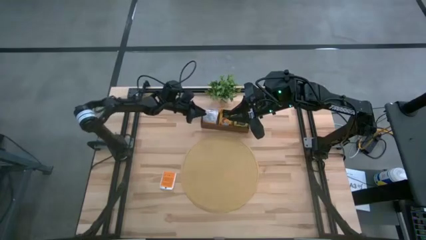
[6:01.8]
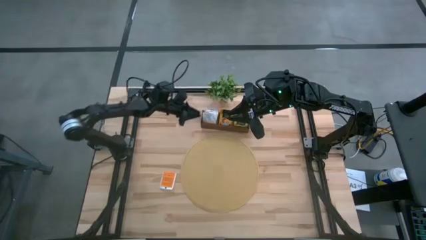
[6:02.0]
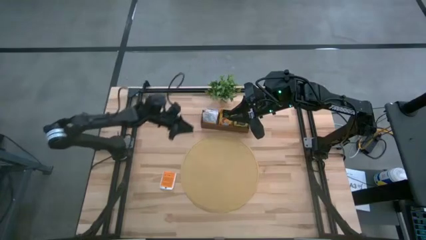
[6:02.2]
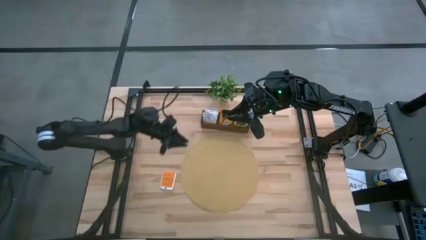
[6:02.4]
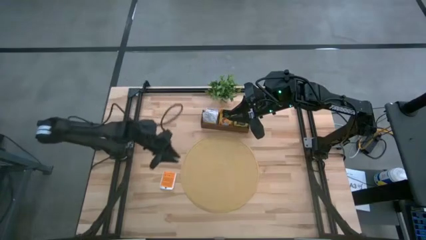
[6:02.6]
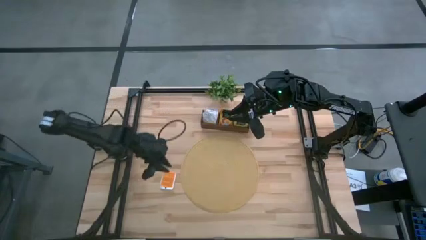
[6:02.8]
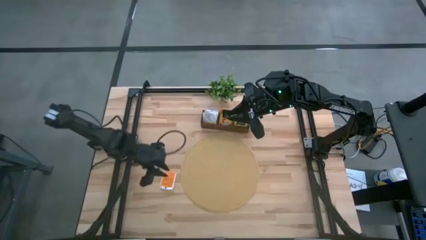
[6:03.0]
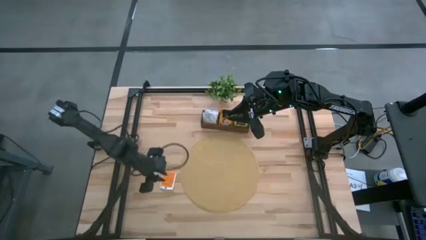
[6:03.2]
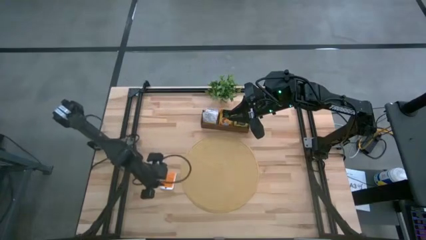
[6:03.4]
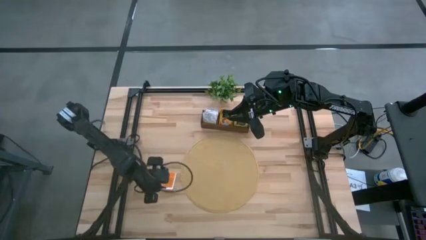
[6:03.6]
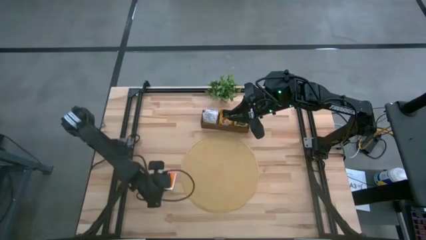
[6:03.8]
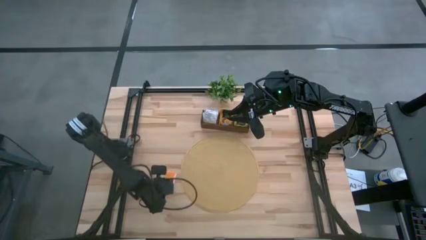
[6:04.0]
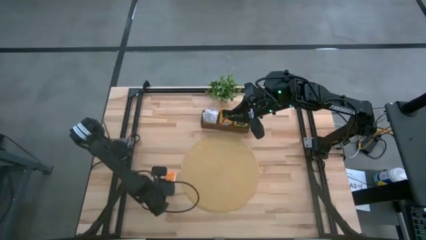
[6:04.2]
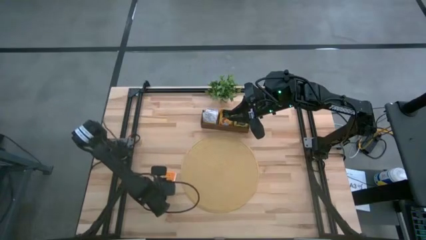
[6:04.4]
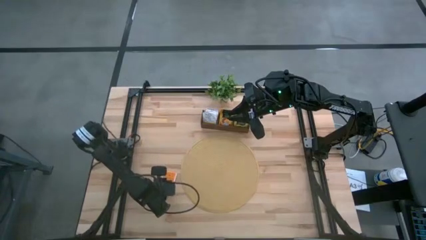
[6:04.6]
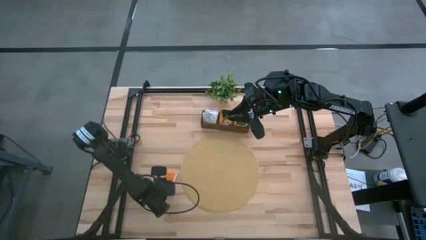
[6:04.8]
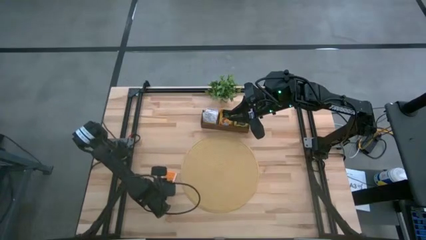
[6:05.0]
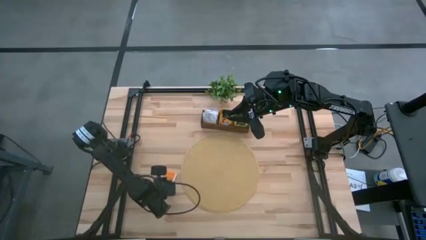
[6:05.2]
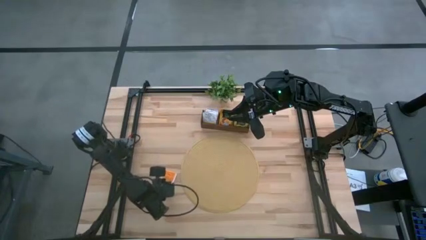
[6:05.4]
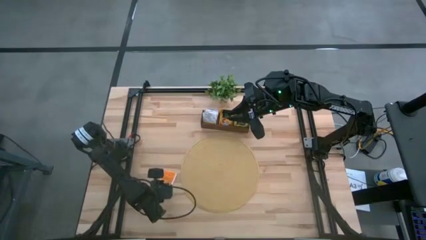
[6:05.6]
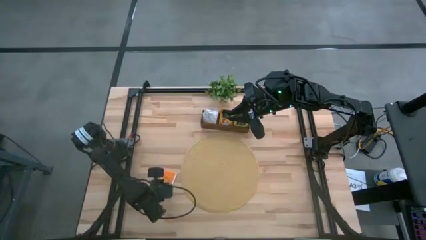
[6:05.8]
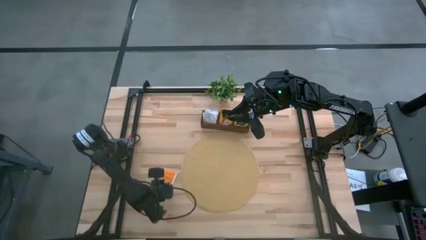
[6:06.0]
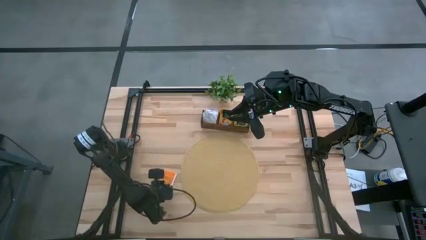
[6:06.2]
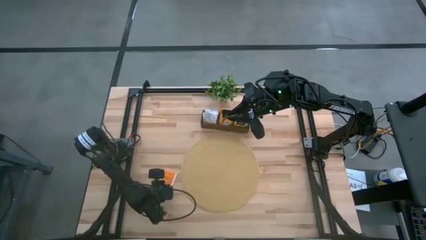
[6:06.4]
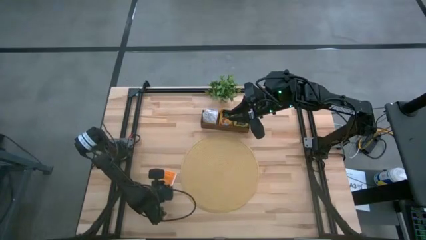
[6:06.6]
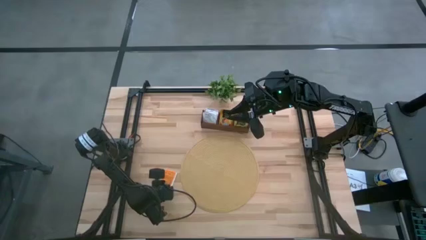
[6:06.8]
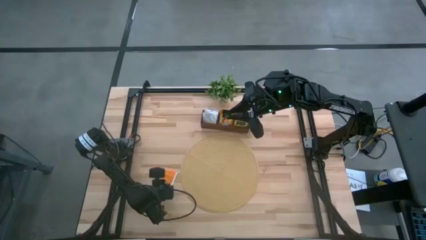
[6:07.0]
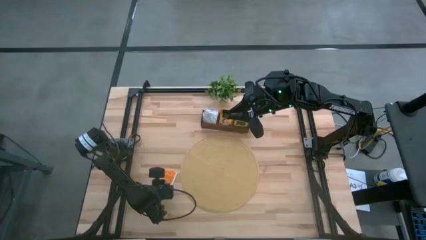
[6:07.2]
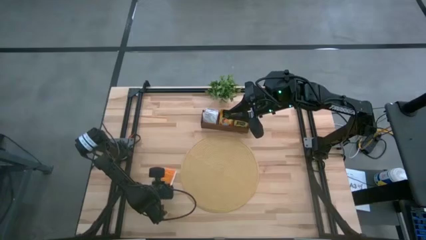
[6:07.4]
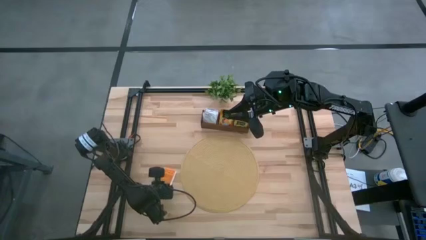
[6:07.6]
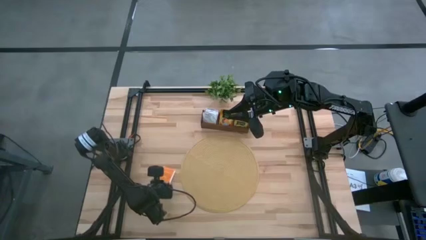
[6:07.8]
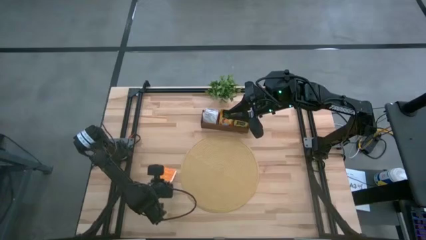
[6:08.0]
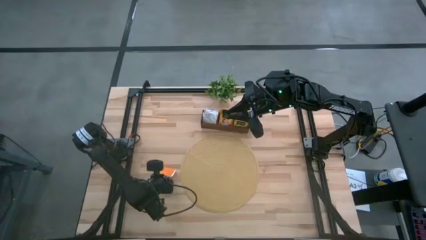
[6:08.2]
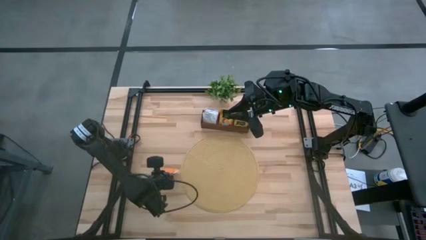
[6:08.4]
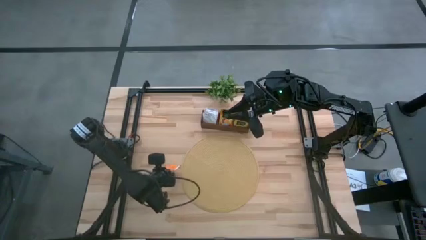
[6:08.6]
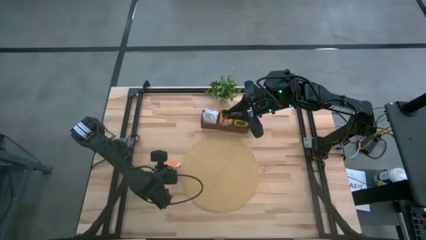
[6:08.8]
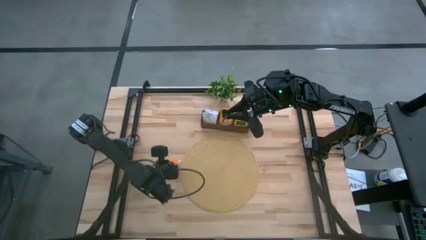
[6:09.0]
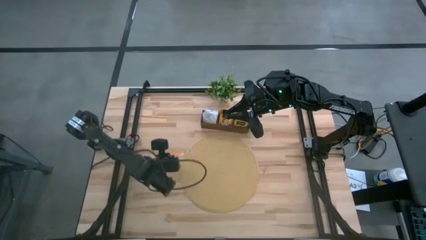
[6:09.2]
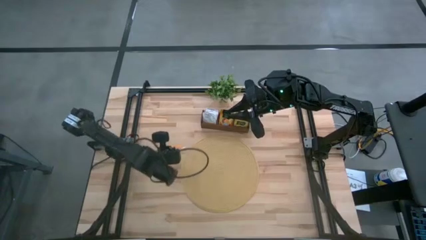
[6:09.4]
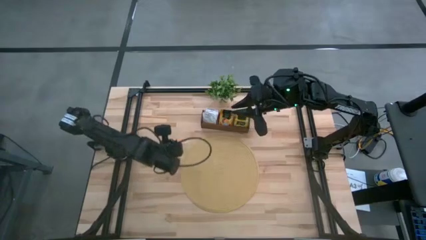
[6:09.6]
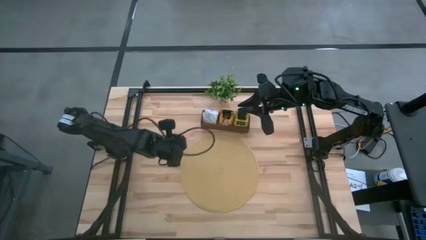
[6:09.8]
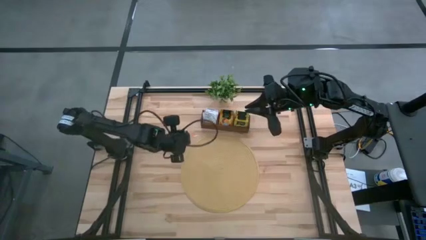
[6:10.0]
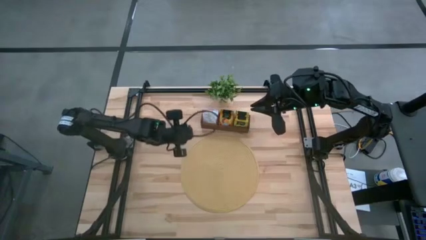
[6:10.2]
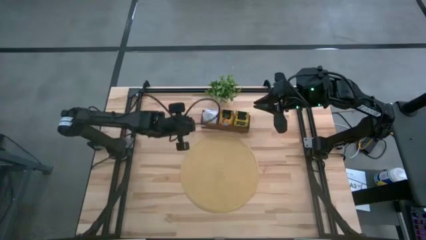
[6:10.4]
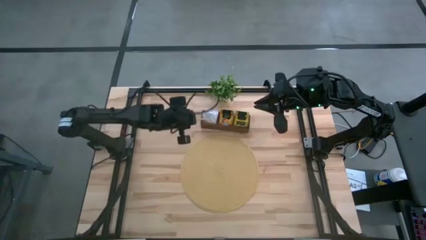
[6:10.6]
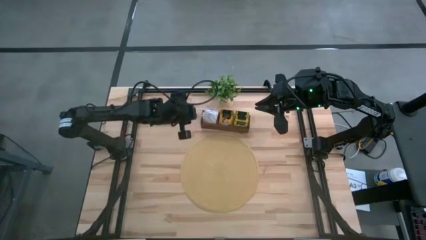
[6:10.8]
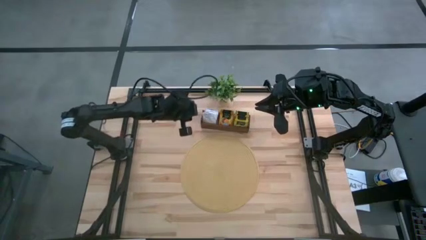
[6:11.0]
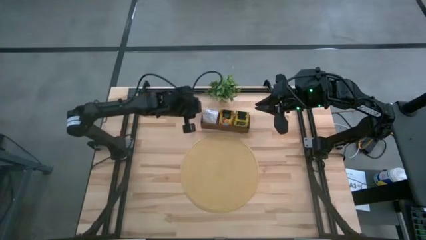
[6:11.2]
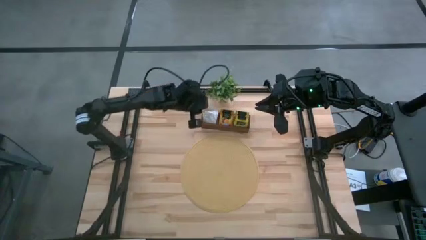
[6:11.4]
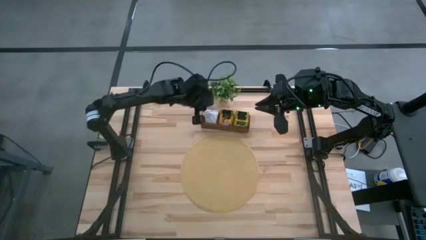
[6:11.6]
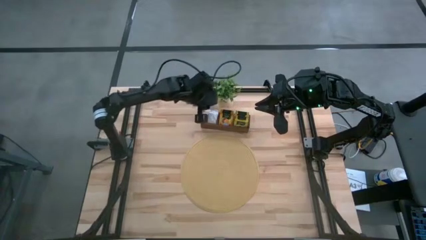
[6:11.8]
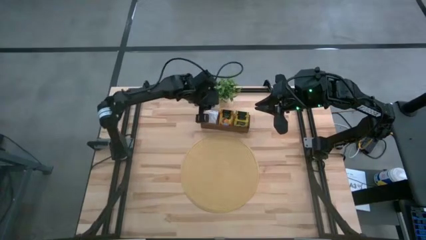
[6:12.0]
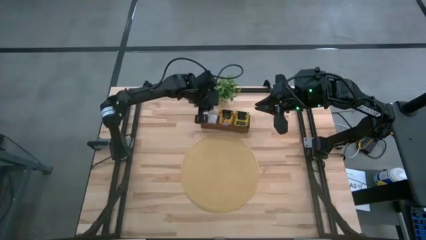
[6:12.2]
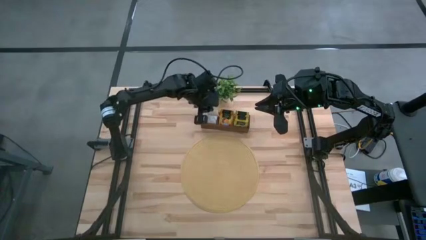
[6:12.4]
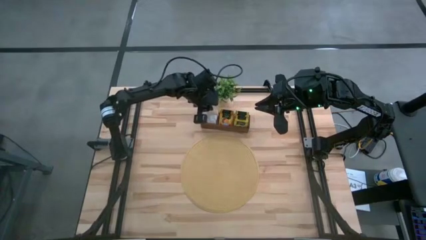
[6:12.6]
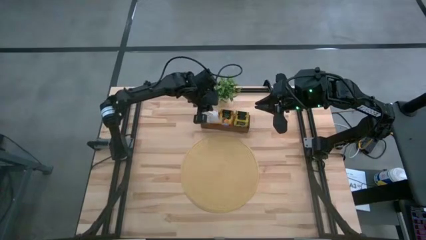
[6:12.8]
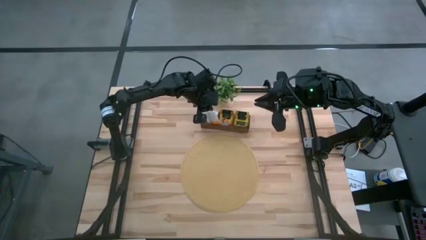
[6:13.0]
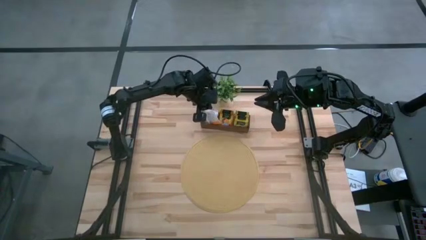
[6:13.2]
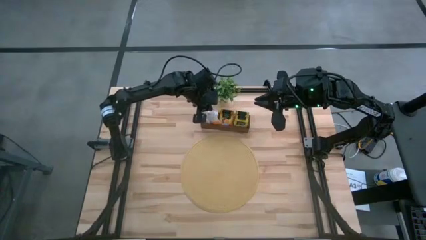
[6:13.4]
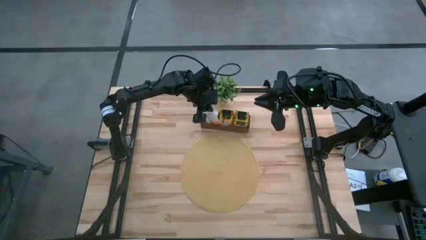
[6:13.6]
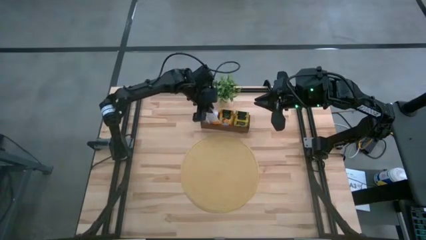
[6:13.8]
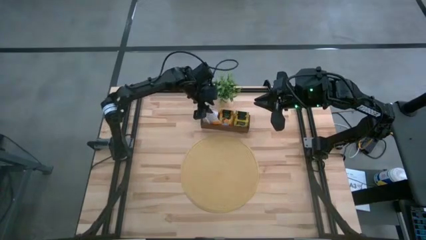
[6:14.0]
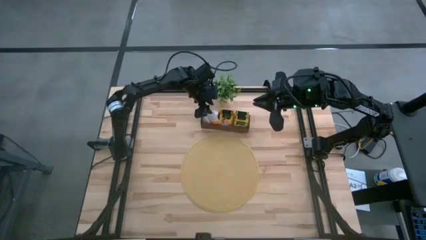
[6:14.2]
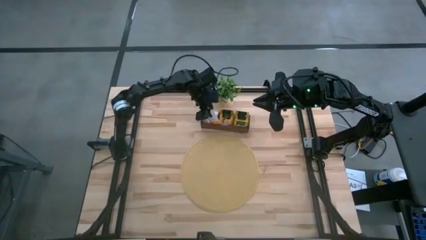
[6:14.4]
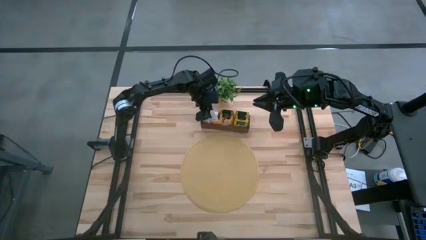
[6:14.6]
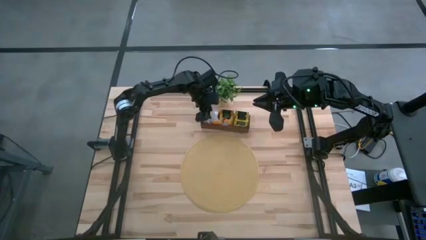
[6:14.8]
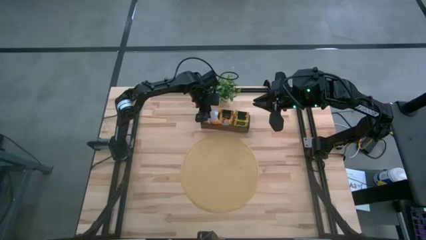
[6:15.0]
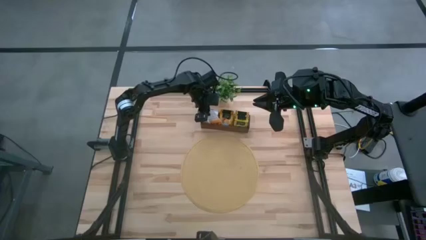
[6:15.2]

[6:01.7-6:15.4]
Task: Pick & Place Tea
Put the white tea bag into the left section of the wooden organizer

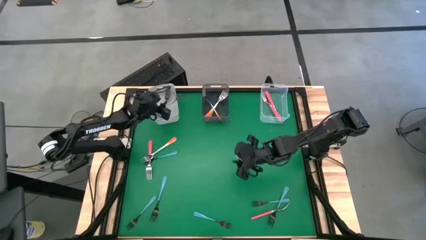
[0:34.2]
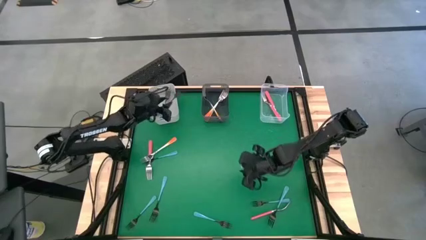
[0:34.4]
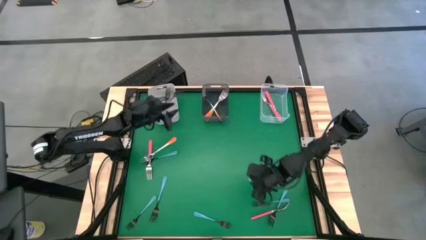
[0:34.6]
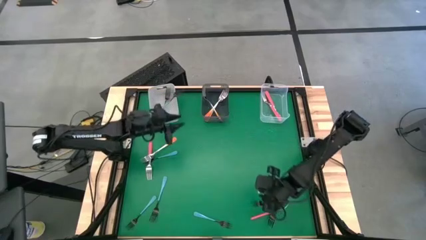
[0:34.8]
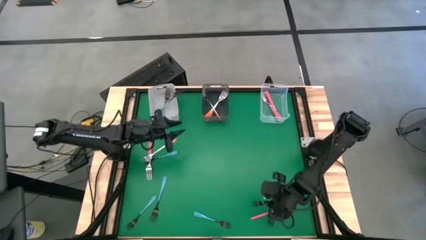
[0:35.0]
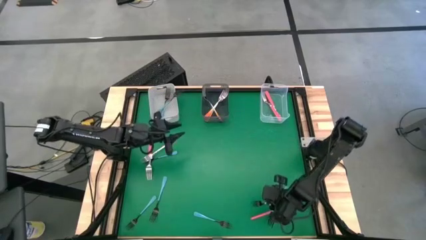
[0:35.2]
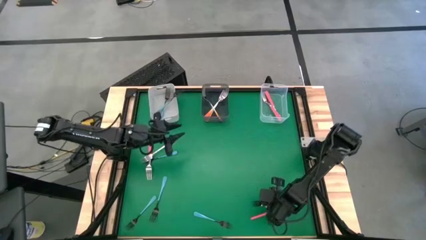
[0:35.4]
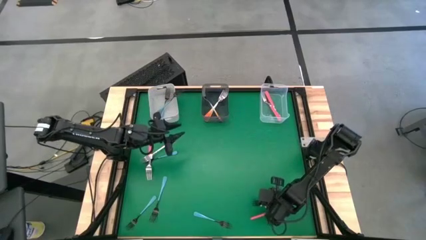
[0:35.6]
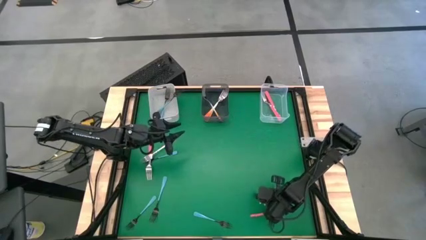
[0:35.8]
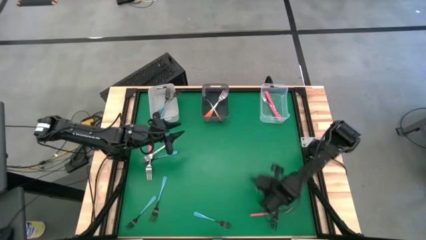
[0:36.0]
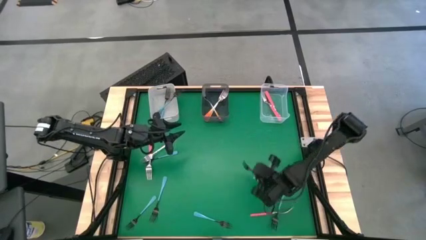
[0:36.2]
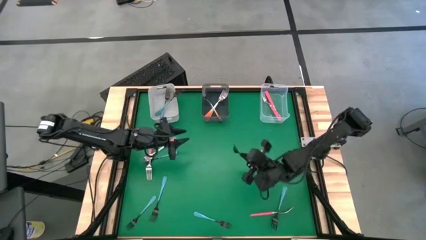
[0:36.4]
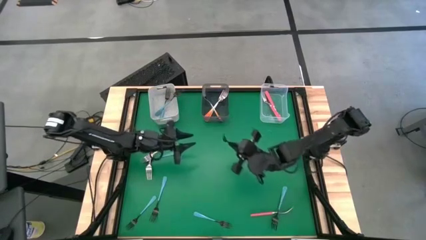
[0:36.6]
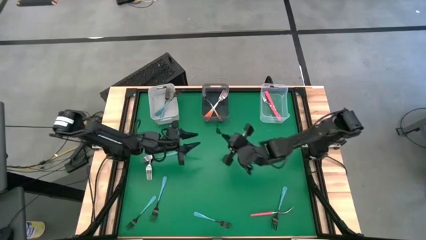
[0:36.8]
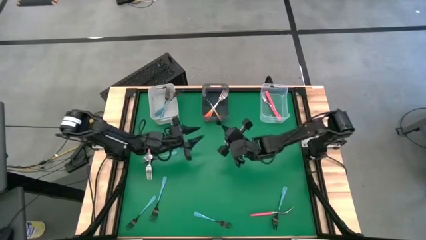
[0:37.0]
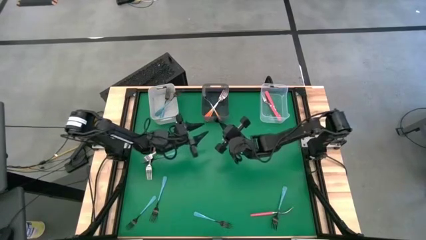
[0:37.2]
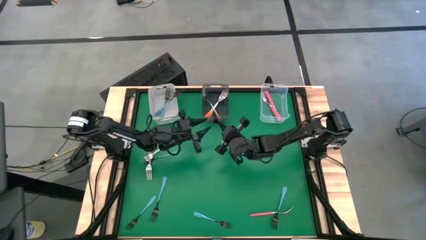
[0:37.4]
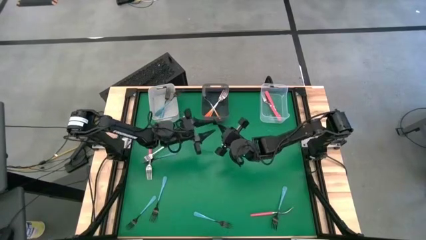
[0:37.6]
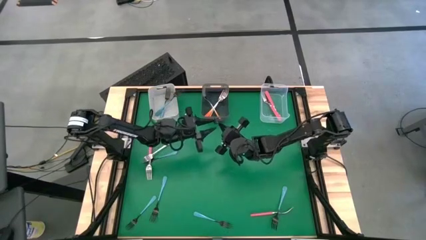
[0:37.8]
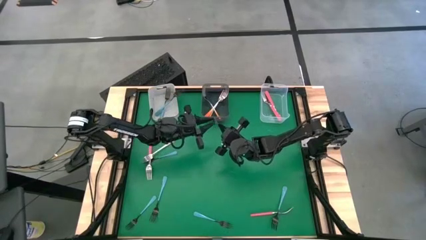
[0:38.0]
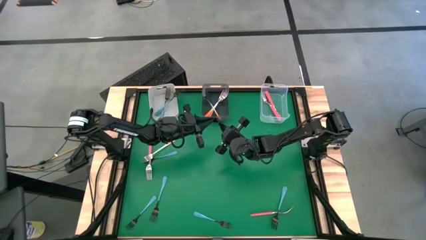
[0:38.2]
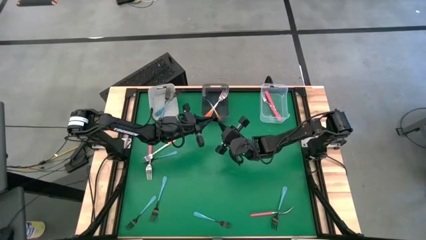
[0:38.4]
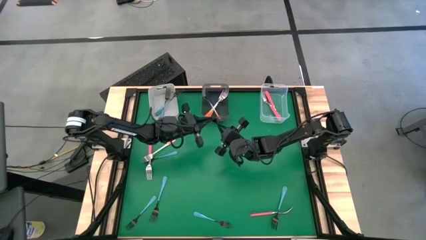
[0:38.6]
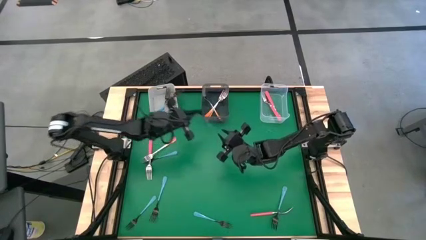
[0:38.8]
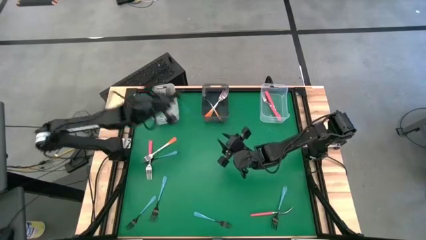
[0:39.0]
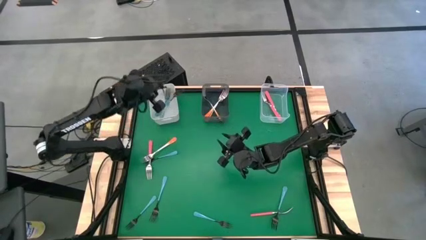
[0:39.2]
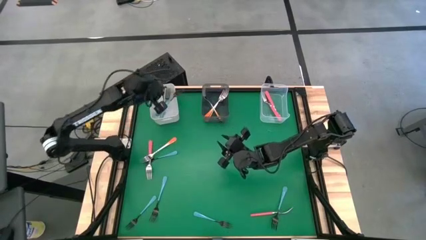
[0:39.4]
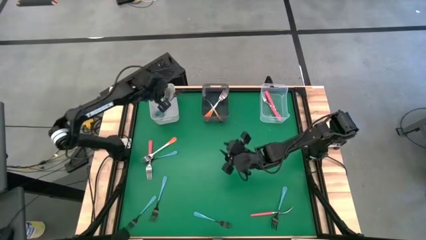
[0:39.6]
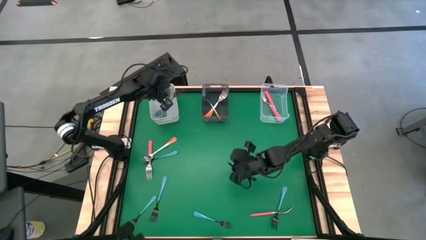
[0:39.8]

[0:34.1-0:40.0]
Task: Sort silverware by color (type)
Put the blue fork into the white bin
